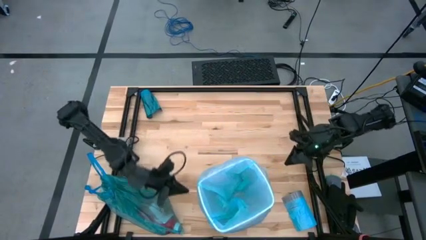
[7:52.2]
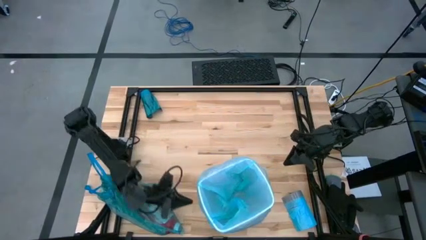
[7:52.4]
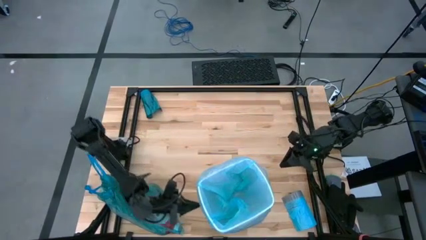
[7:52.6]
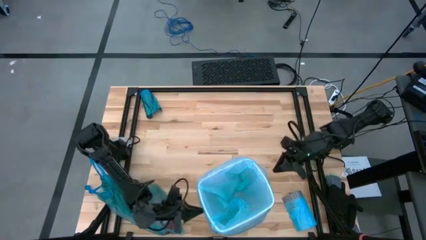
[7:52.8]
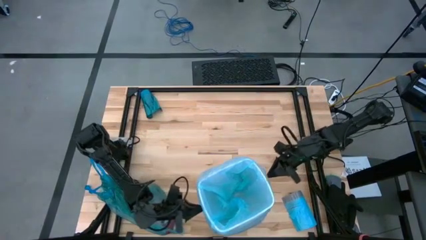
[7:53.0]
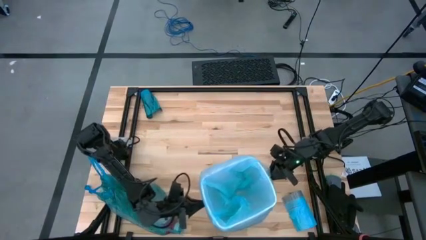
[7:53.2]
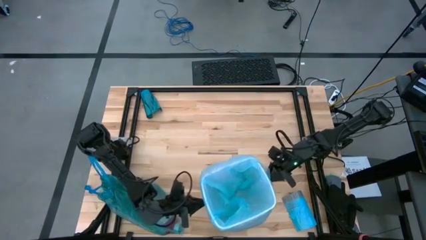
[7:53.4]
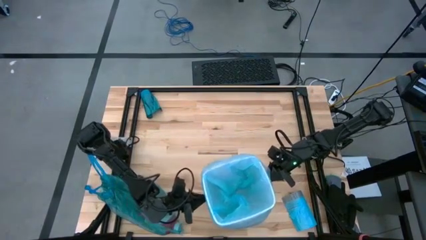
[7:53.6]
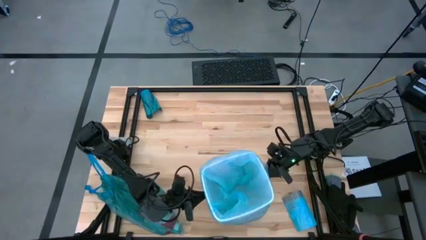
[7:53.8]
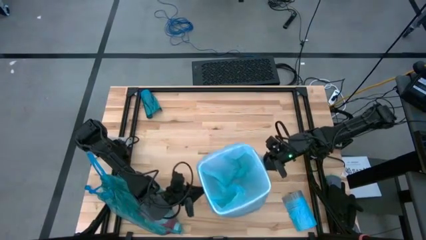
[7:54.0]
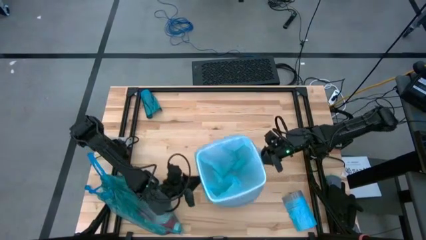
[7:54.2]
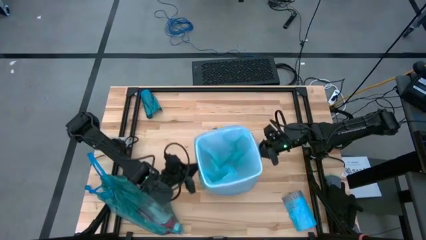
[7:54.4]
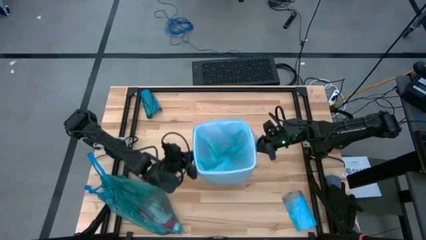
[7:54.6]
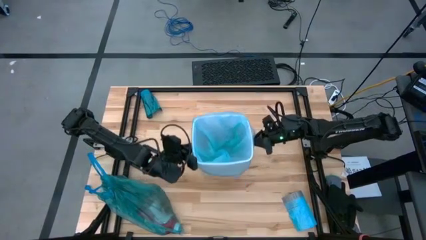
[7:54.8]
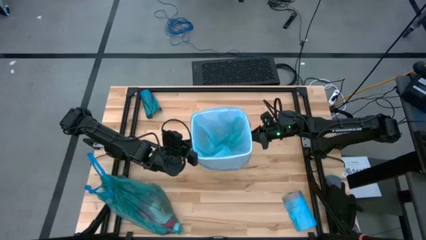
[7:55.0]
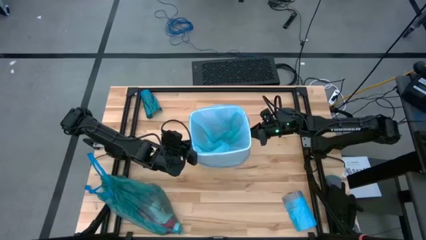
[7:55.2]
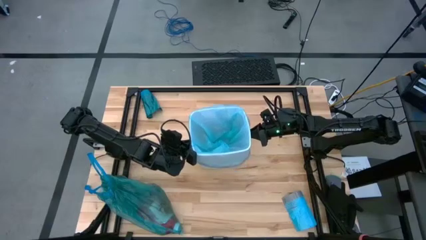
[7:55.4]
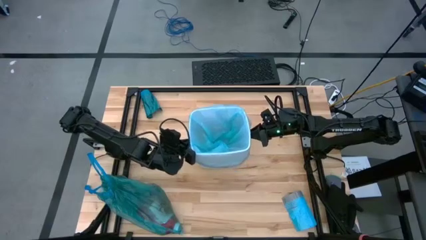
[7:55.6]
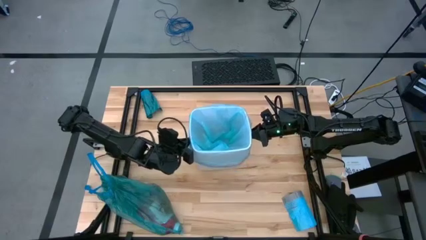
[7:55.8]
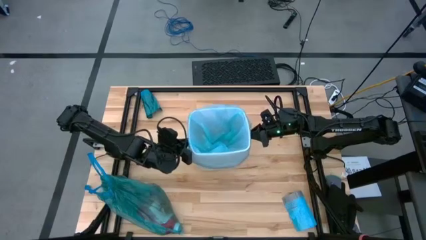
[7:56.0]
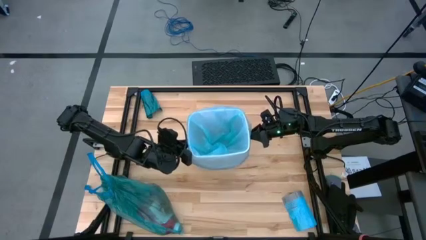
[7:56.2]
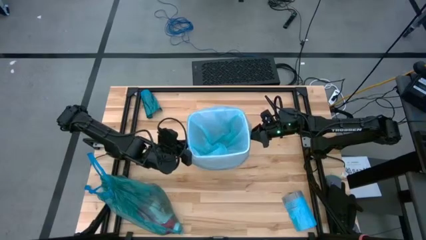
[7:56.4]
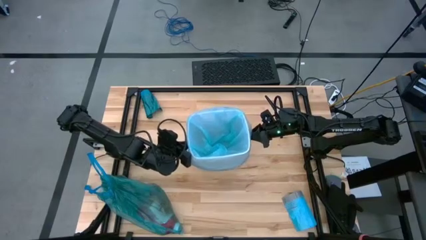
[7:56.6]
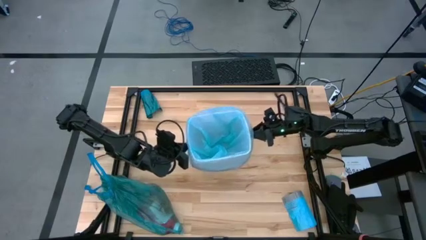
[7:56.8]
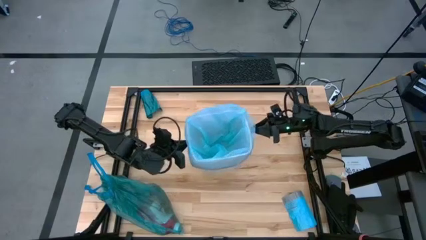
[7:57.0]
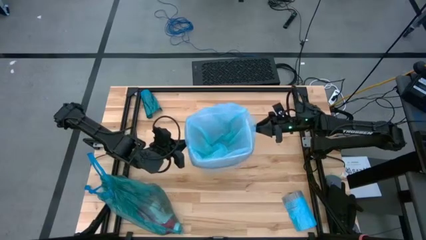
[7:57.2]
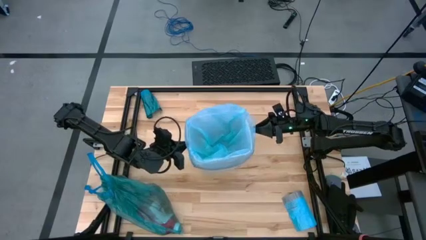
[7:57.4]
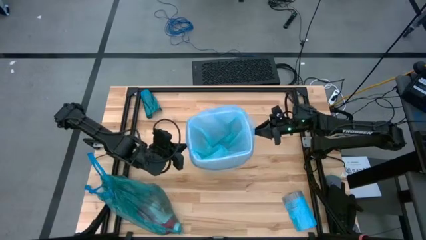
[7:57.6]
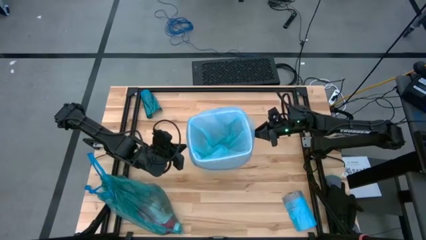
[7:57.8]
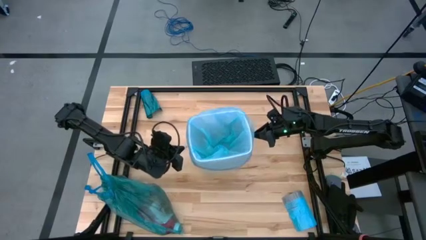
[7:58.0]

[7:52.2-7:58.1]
Task: place trash/remove bag and relplace
Move the white trash bin to the center of the table

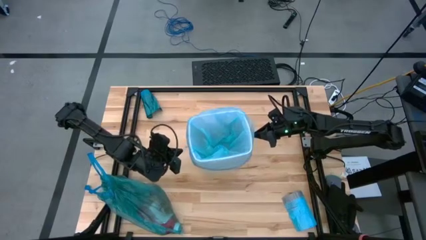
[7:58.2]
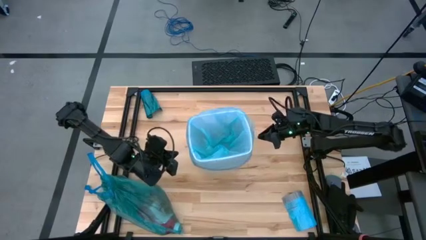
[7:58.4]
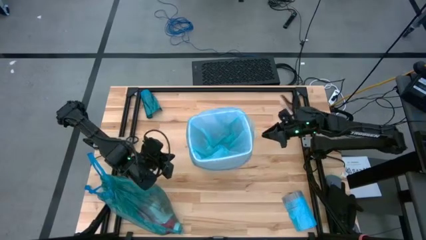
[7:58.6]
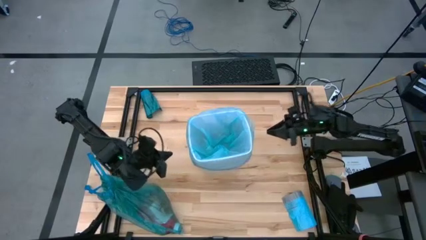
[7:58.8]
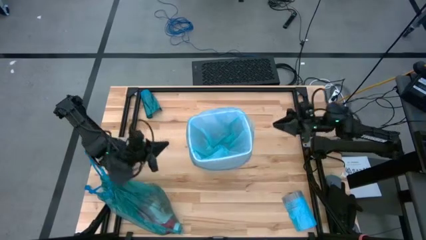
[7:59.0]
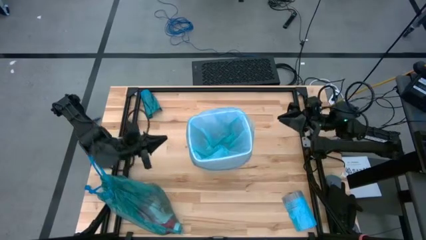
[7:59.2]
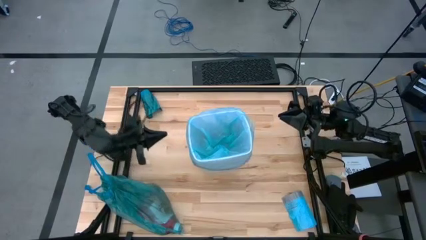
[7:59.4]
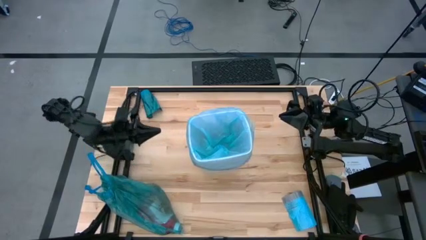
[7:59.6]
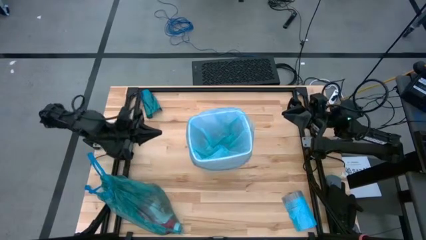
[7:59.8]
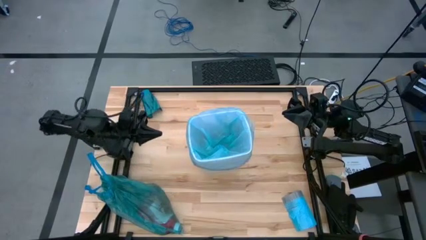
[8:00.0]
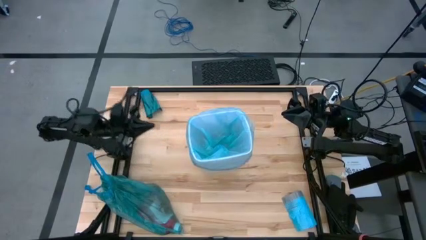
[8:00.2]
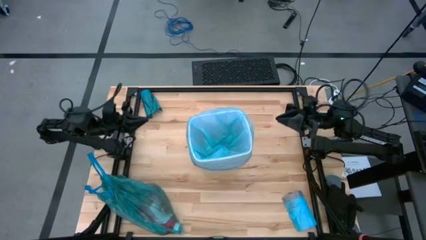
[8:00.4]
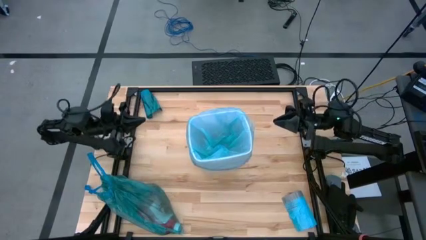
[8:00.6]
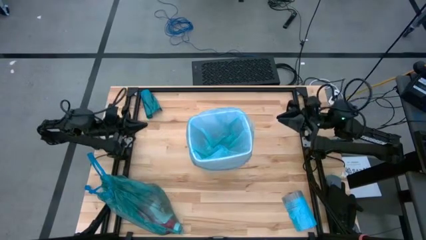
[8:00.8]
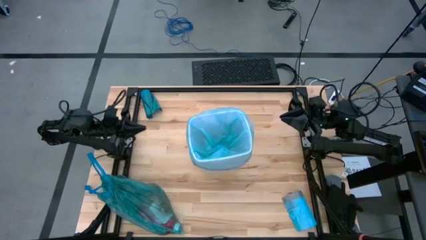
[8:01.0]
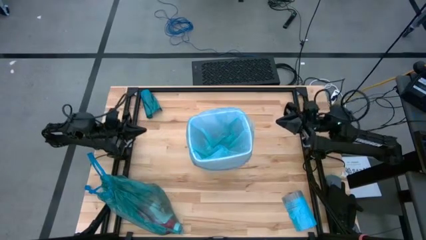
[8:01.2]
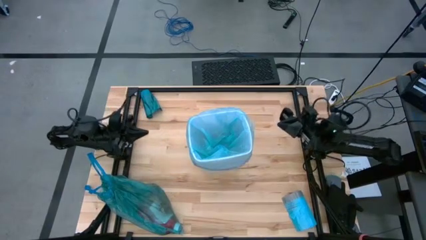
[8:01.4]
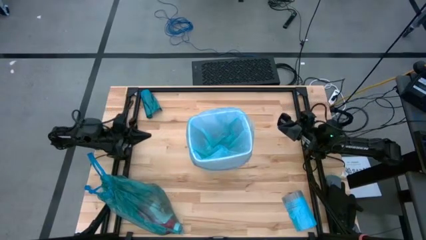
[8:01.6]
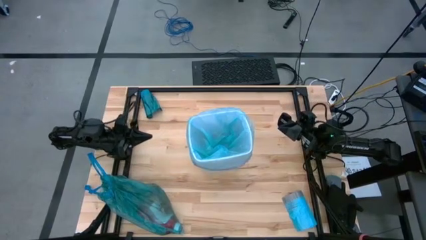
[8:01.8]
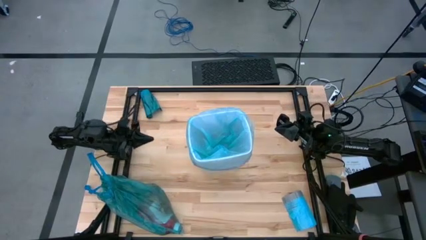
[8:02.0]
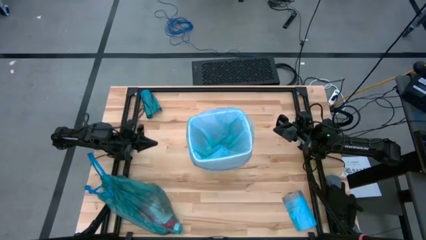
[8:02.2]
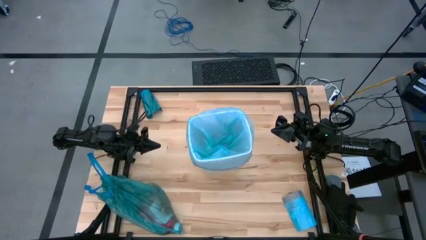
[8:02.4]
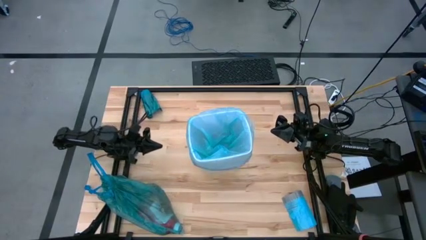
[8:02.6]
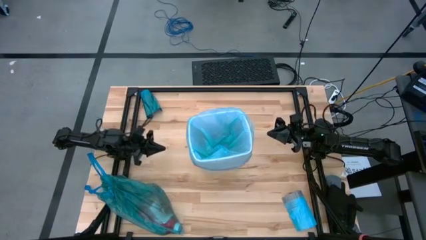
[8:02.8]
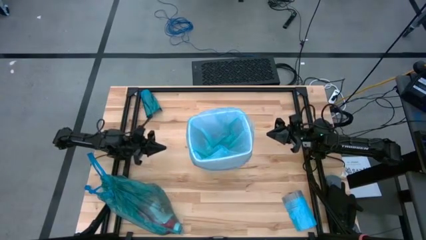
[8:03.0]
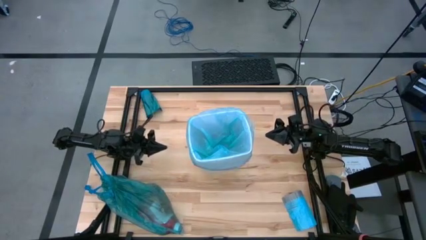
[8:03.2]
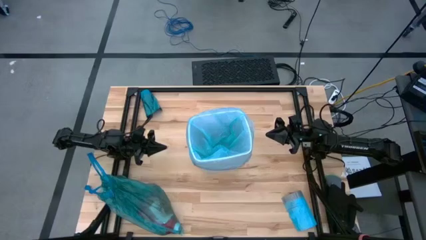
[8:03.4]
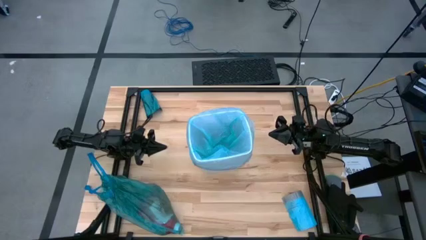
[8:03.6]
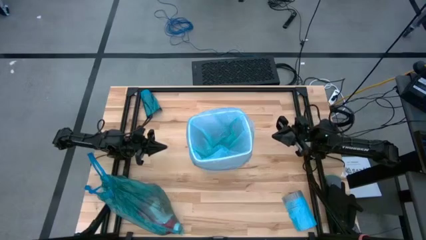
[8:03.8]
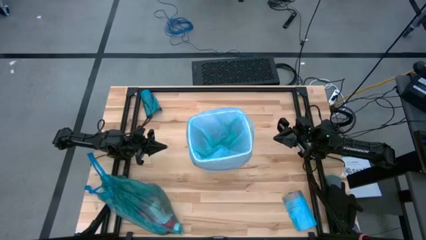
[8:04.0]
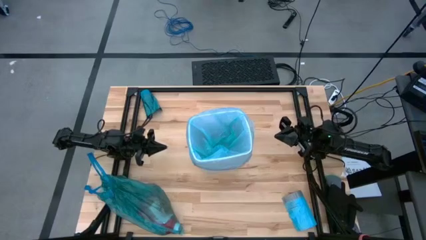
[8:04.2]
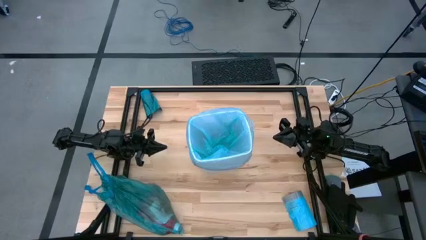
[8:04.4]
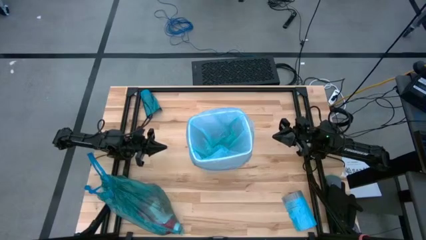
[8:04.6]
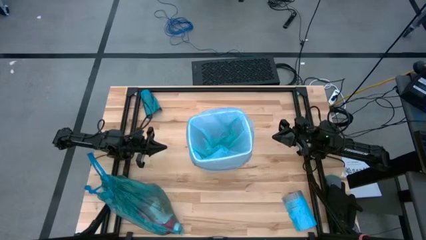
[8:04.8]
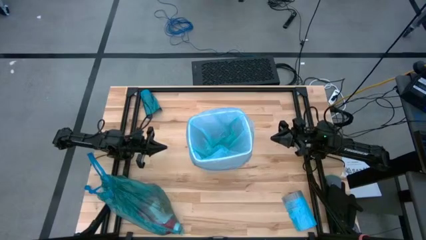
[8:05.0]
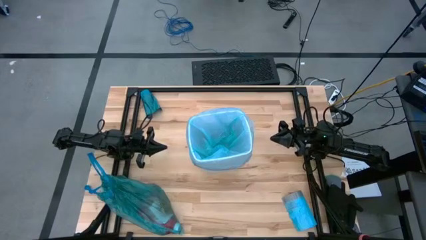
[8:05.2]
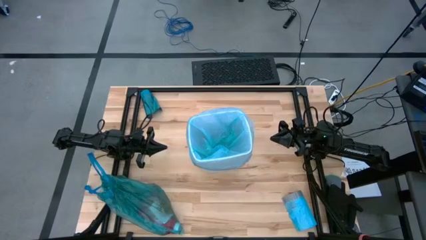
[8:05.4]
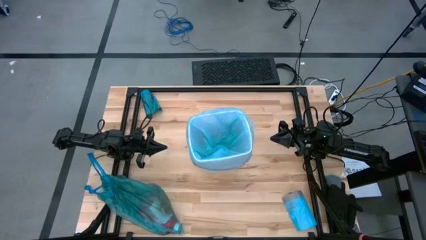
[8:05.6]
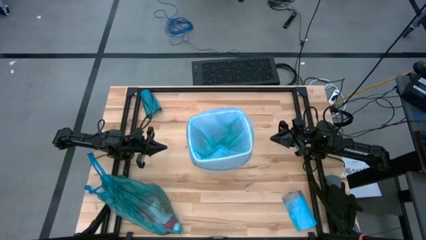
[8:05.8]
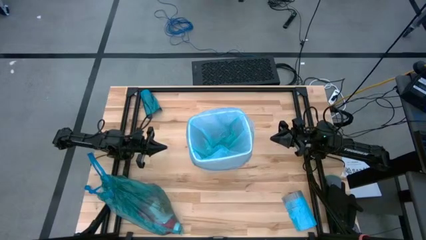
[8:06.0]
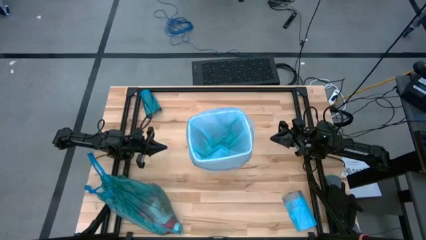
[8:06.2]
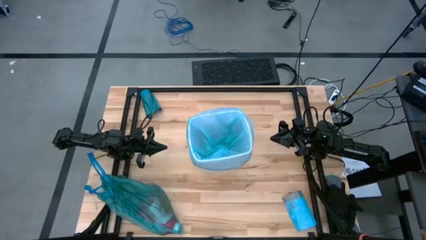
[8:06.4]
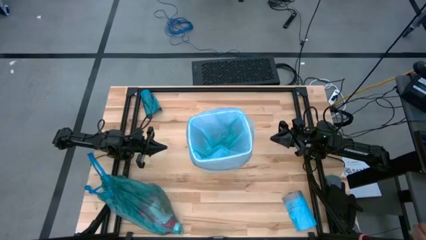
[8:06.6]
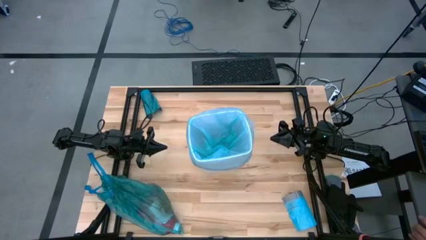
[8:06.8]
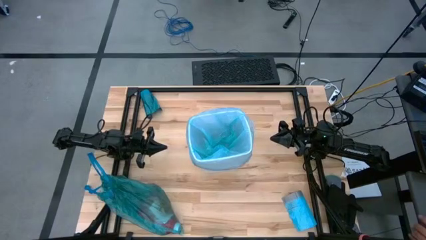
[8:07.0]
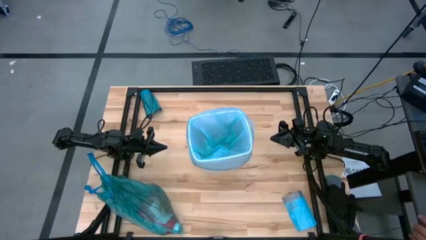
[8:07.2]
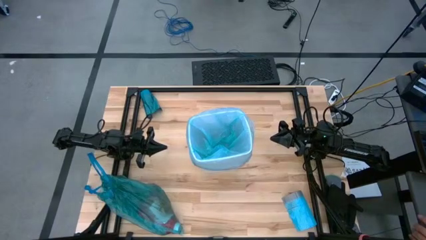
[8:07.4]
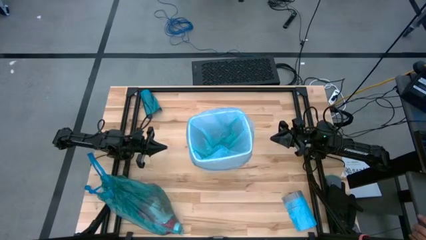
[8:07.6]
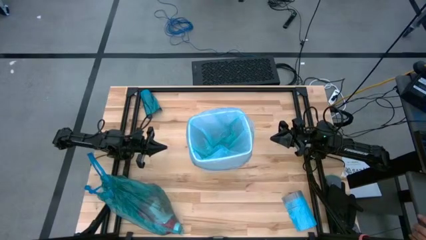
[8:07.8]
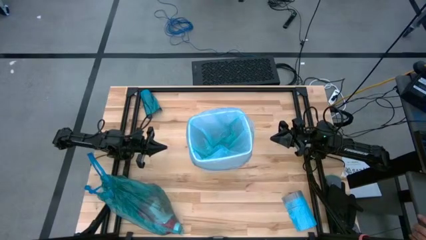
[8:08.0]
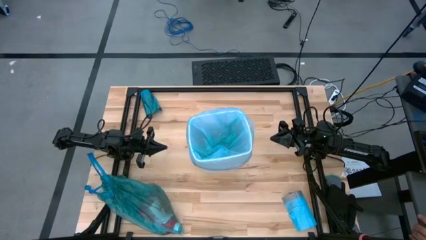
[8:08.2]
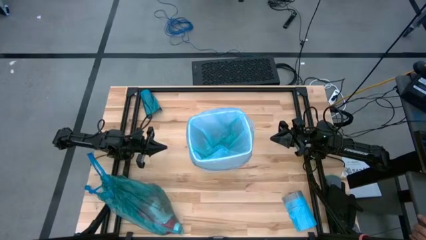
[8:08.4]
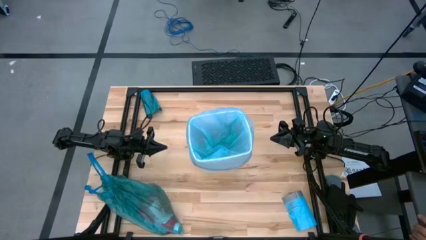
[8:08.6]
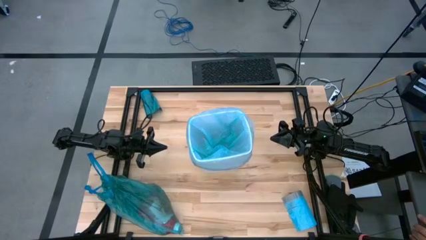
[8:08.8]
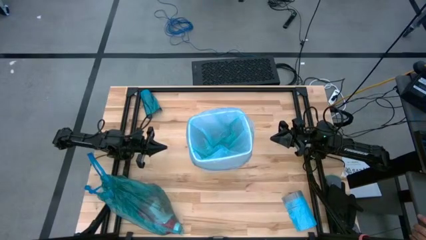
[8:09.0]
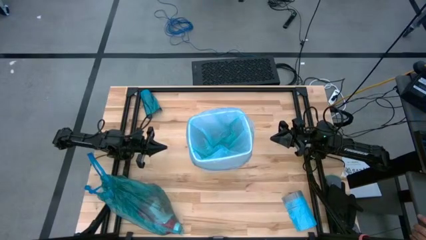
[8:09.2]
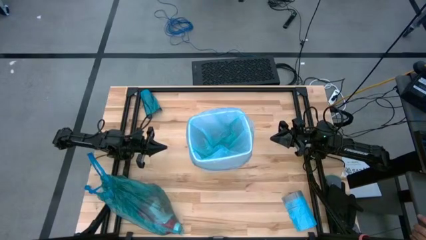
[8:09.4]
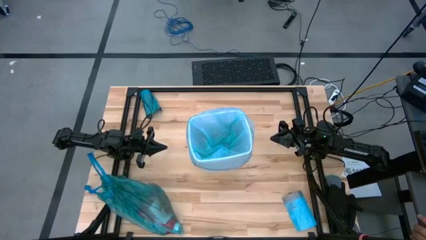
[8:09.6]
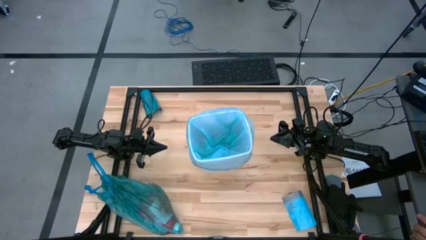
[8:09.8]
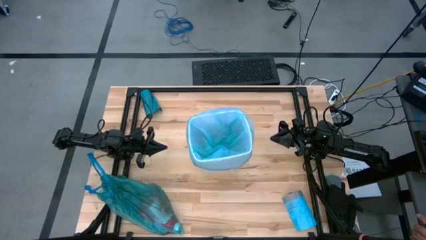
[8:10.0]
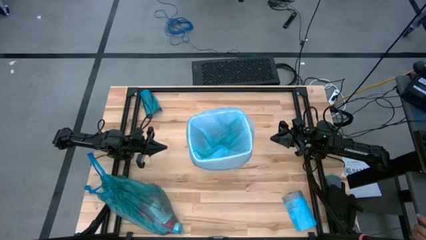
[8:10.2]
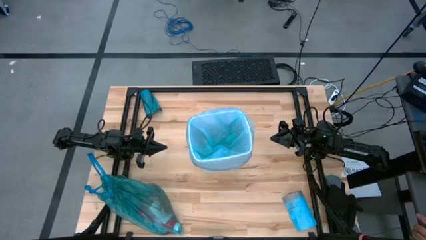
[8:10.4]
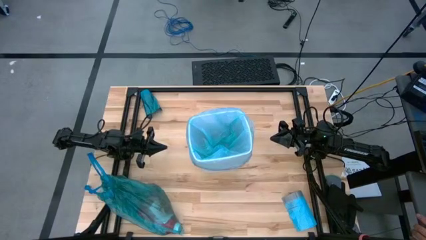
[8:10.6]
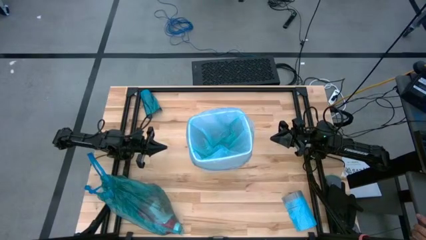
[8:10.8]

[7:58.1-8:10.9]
Return to Home Position
